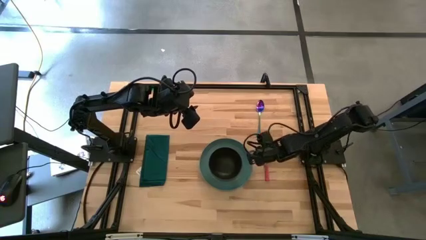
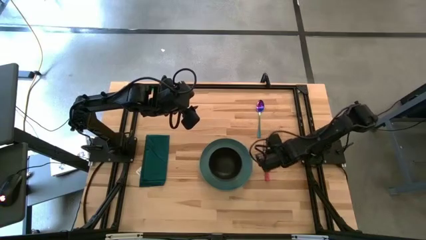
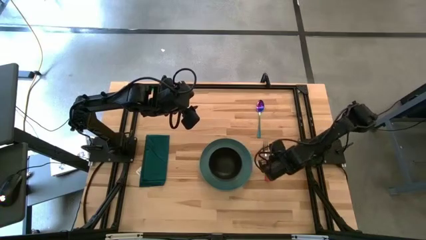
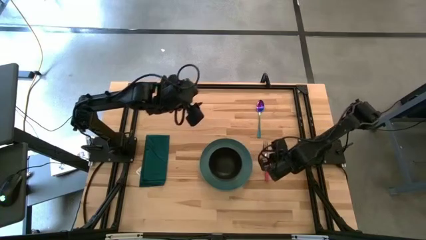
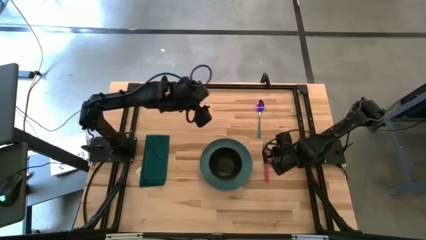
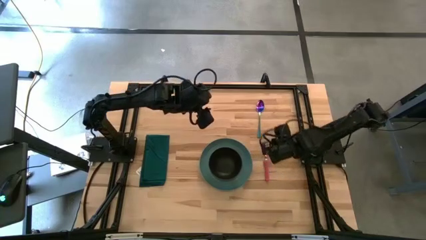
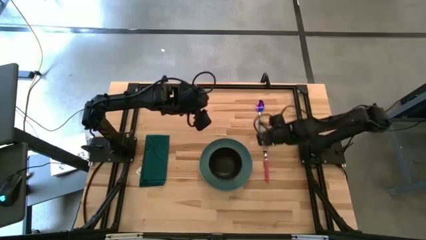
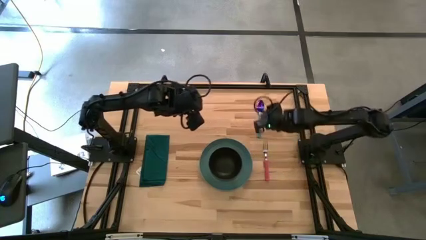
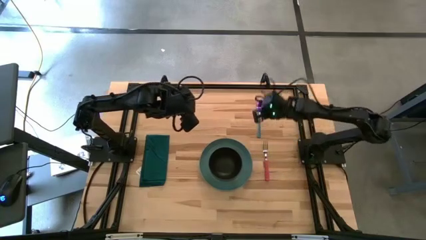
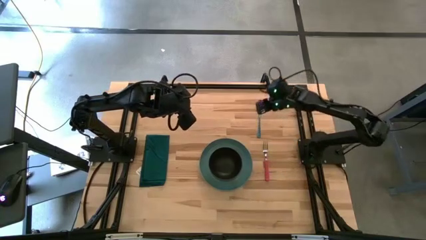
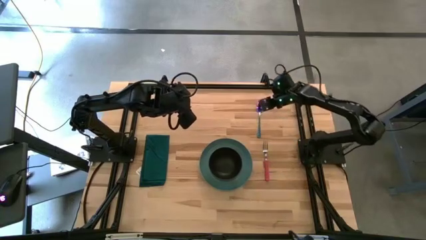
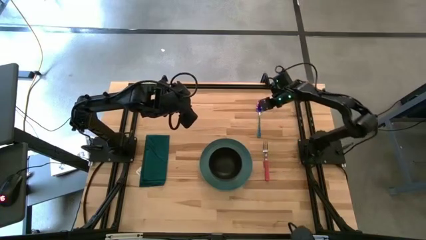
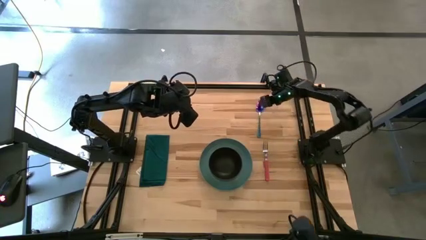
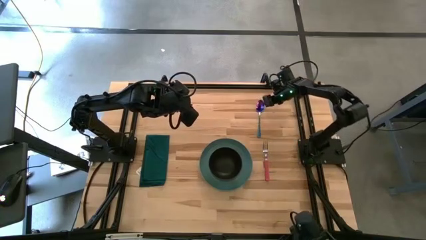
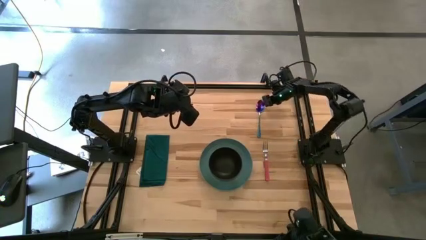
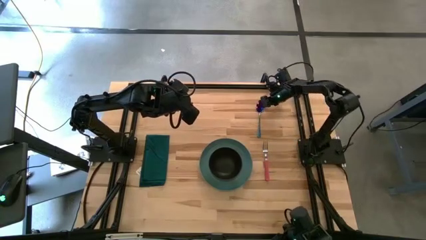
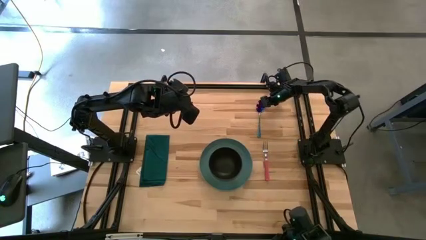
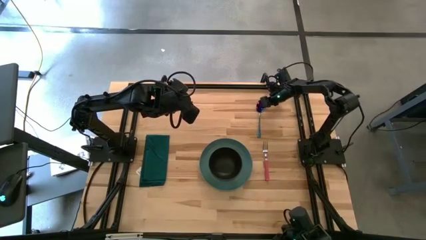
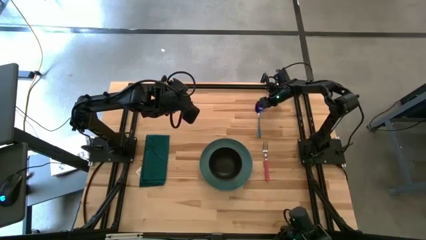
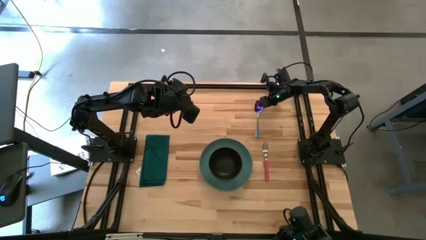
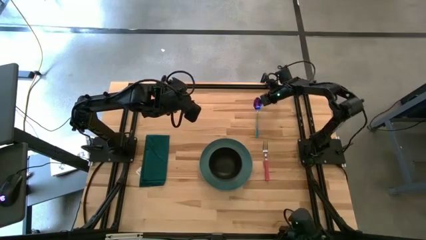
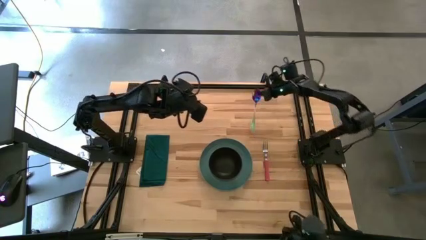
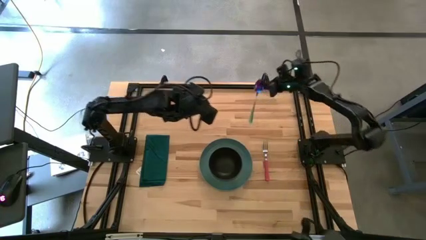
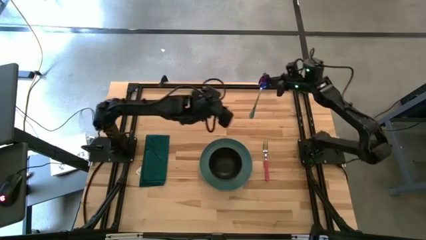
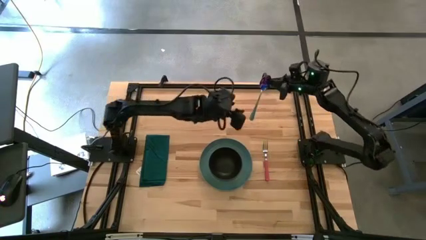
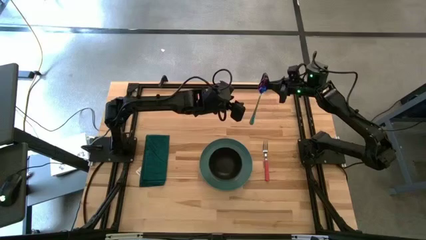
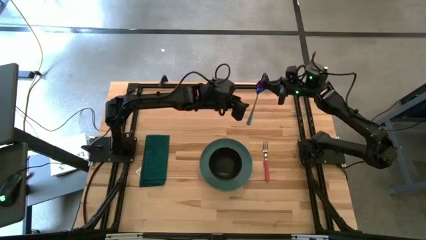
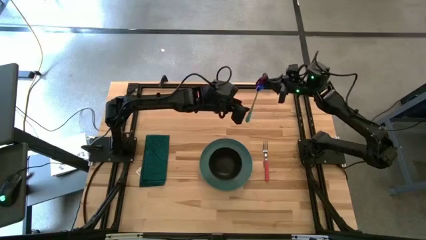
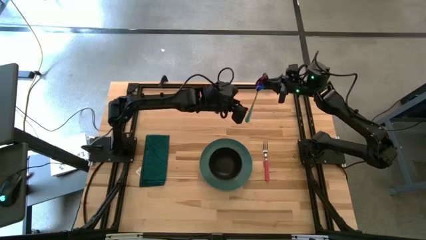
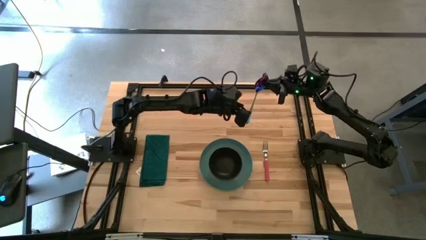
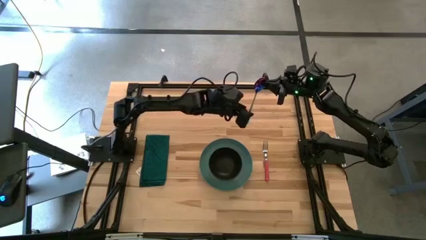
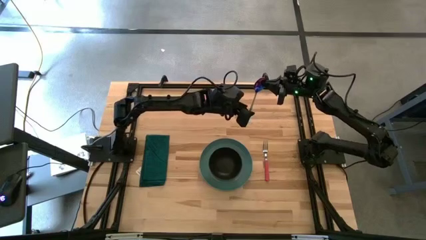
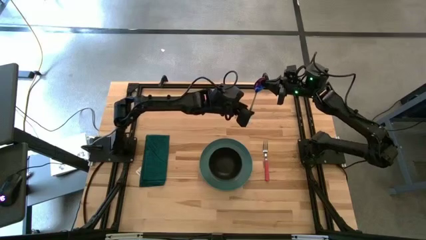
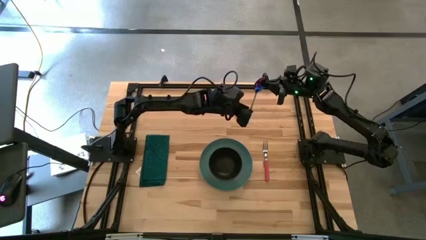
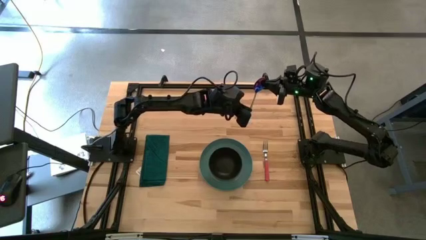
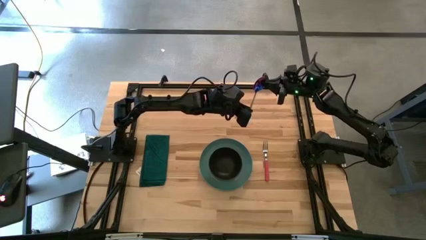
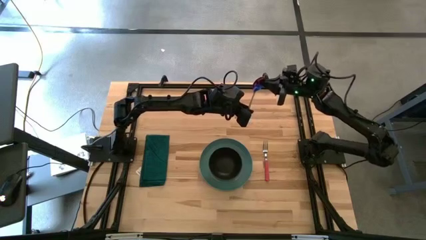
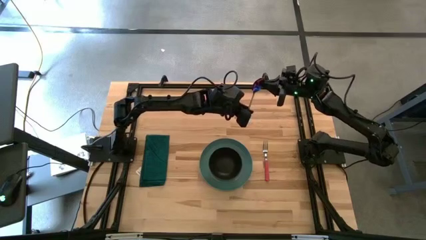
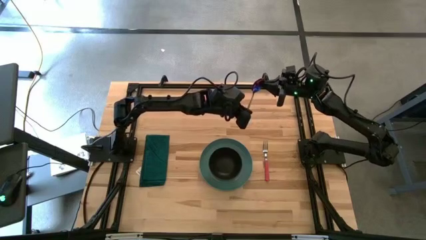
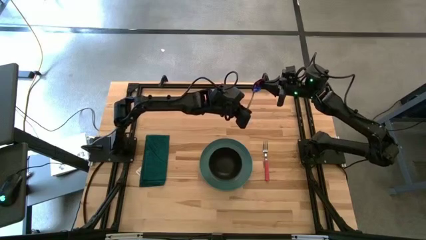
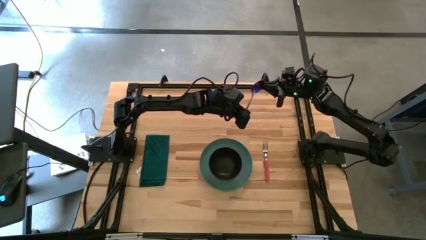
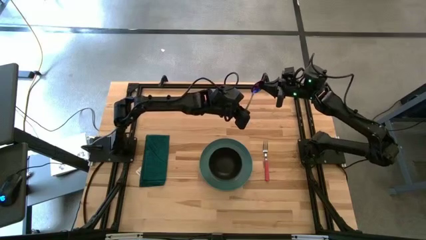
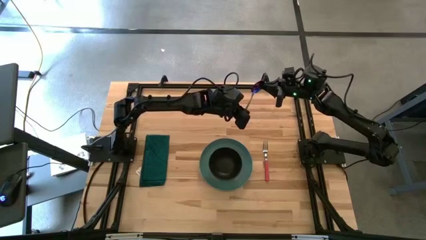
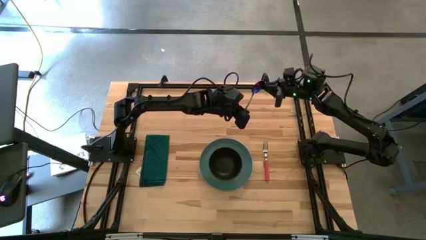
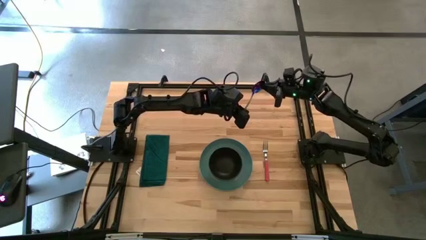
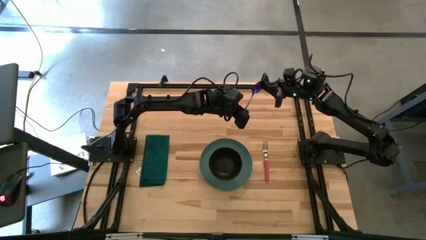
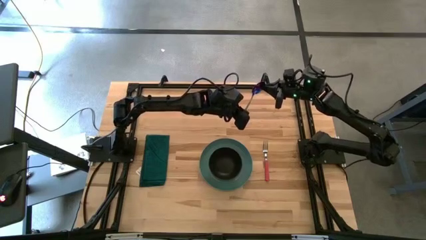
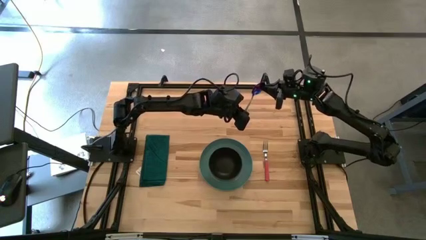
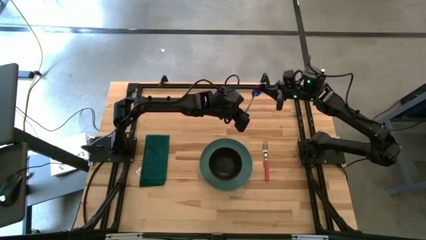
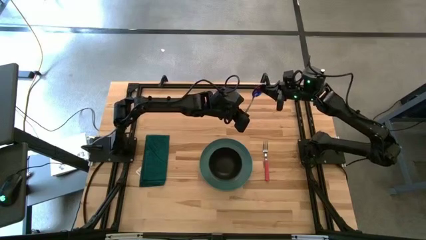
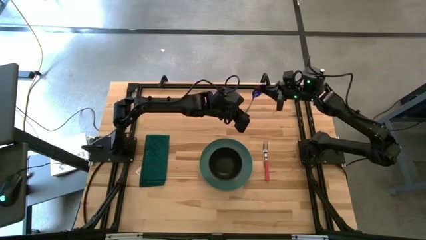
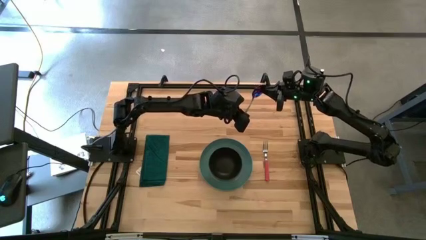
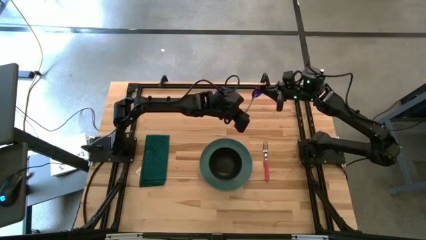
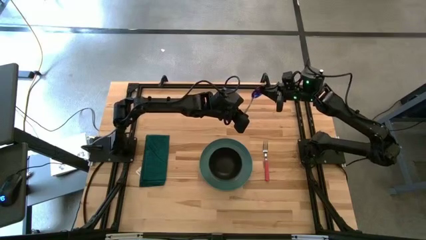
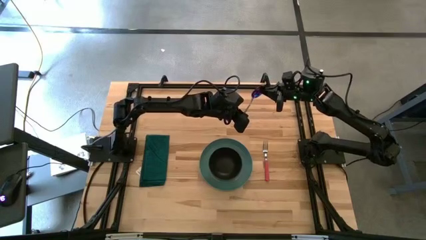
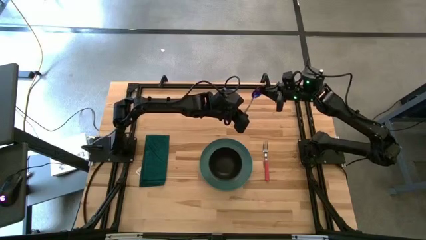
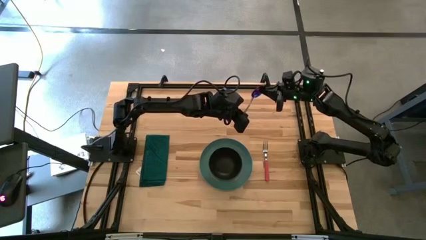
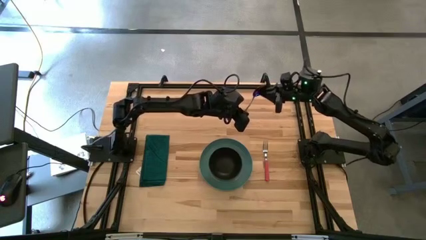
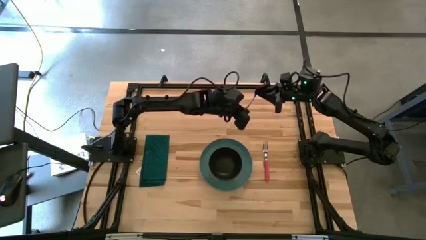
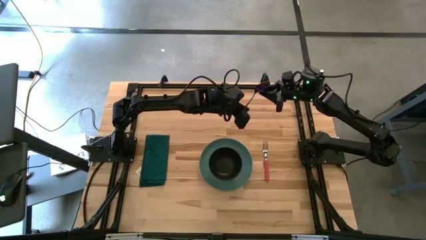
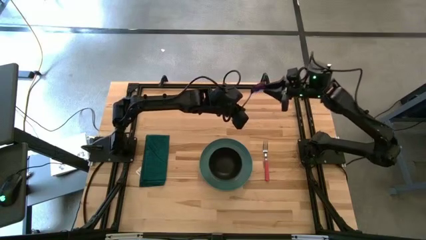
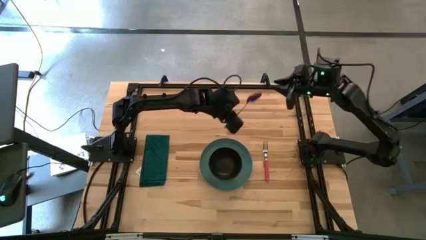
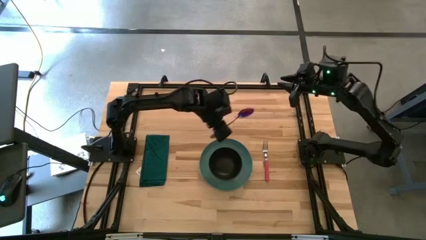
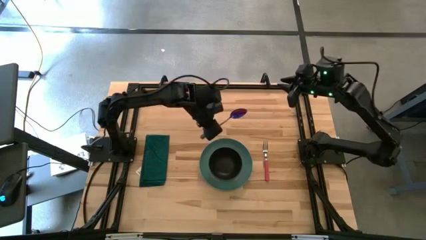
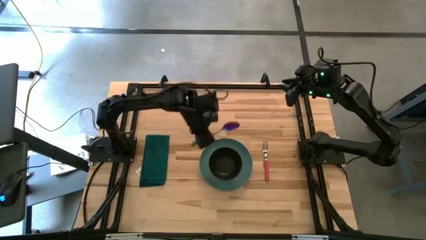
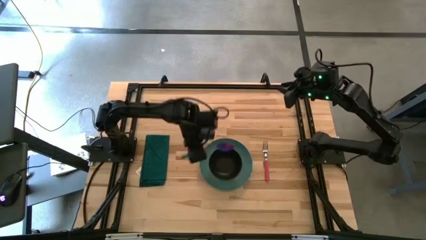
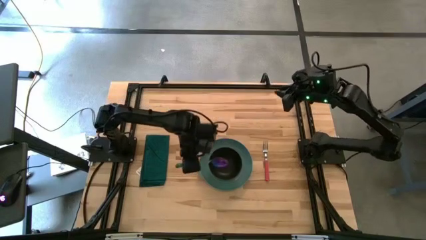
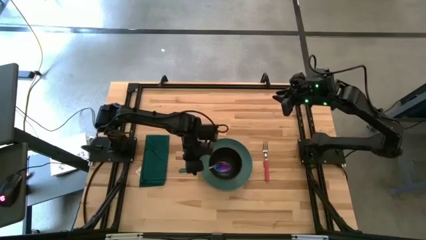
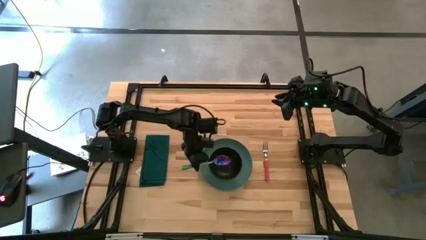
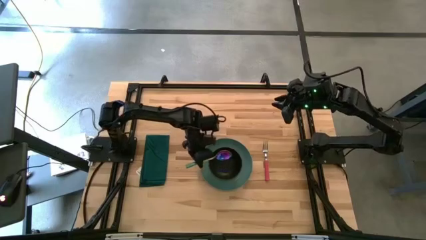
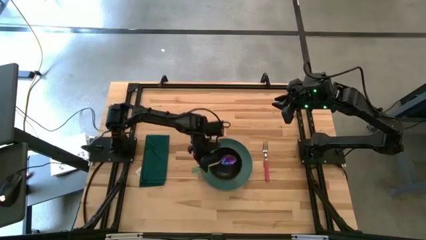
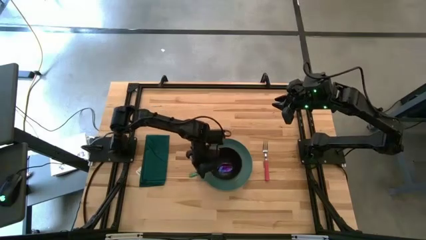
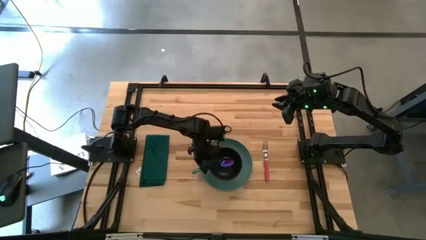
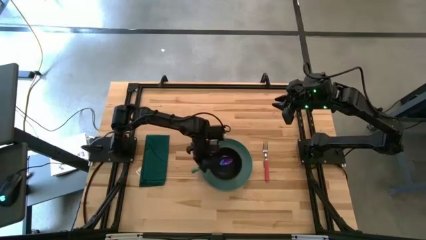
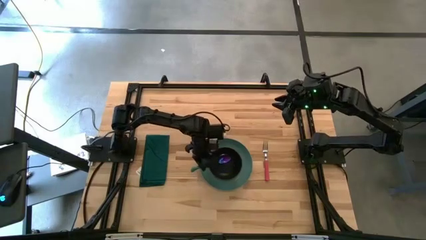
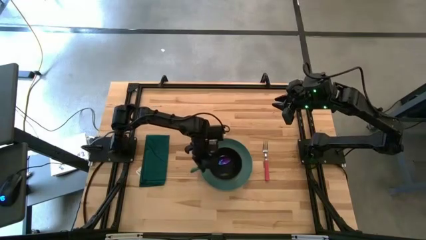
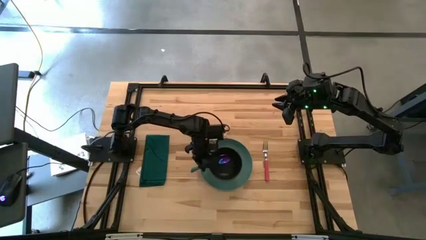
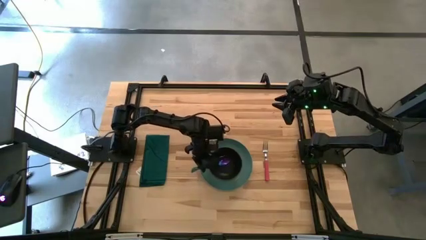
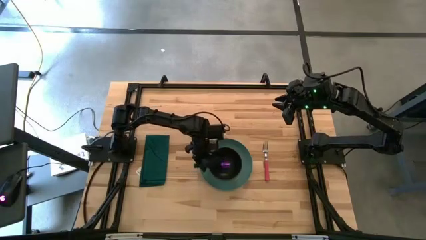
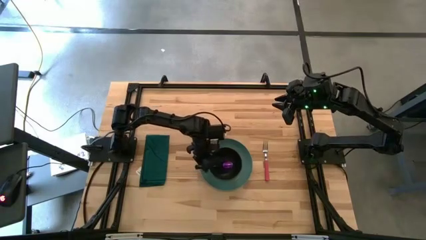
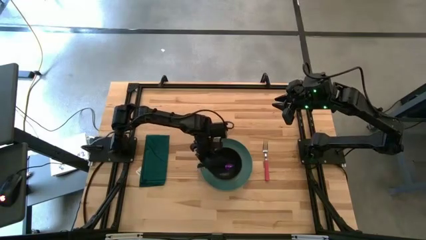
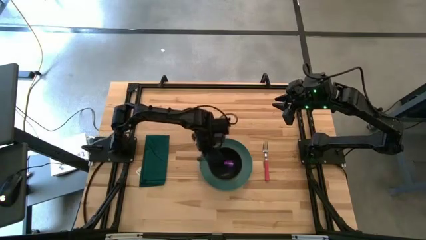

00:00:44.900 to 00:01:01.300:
Task: Set table place
Put the blue spoon into the black bowl
